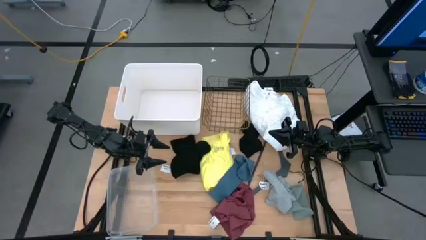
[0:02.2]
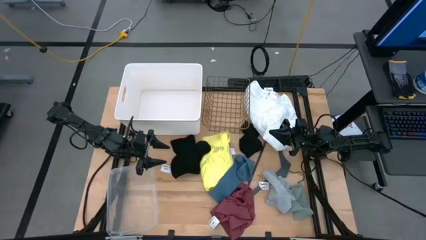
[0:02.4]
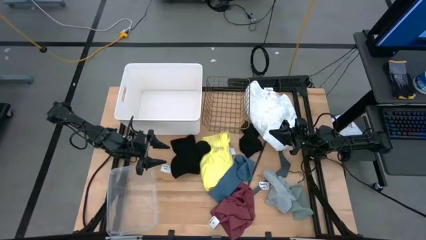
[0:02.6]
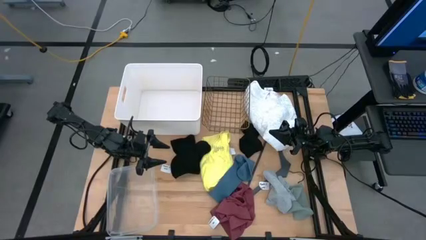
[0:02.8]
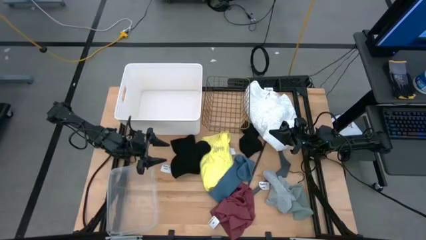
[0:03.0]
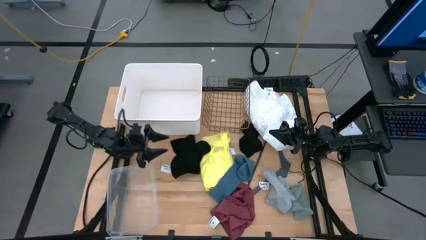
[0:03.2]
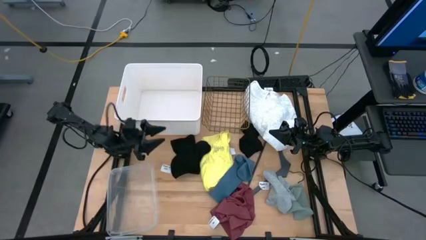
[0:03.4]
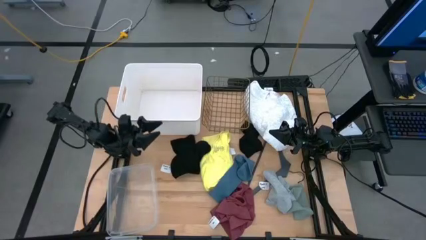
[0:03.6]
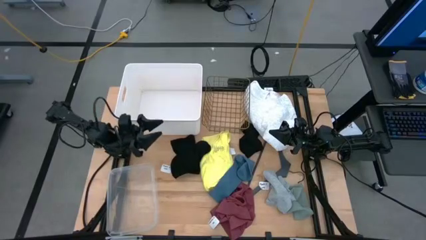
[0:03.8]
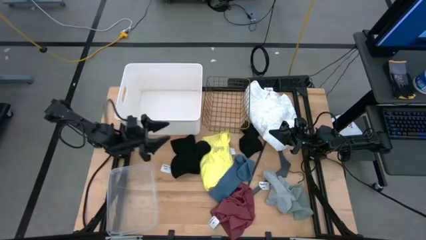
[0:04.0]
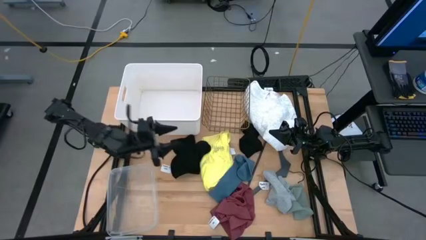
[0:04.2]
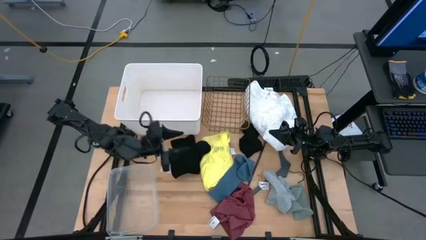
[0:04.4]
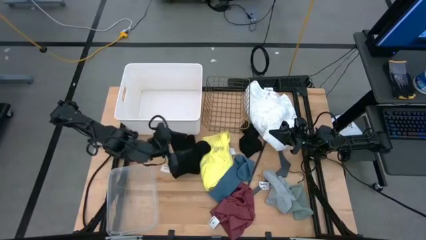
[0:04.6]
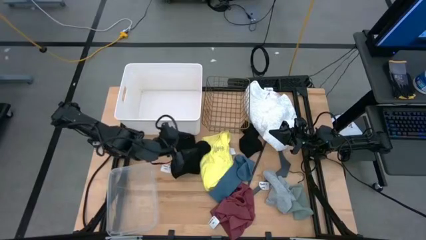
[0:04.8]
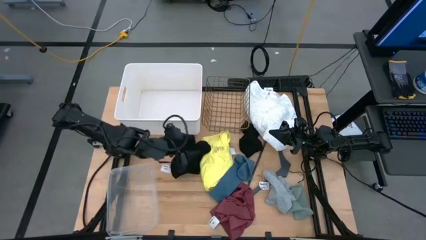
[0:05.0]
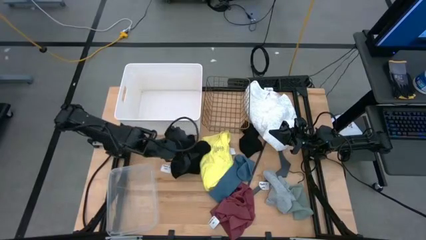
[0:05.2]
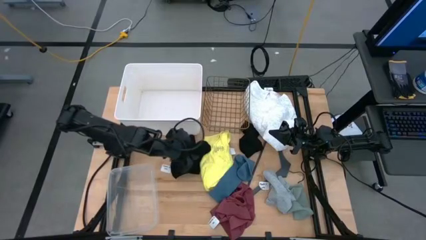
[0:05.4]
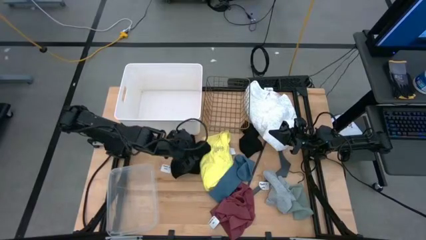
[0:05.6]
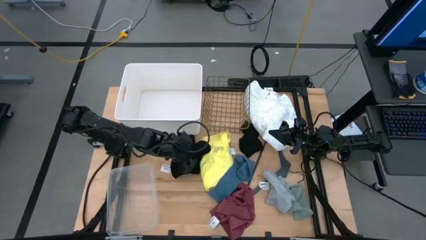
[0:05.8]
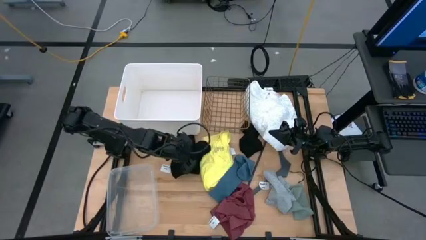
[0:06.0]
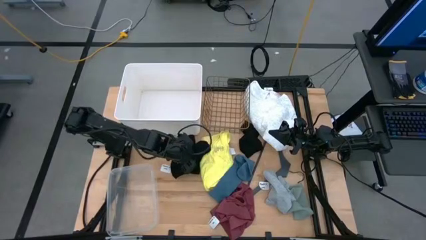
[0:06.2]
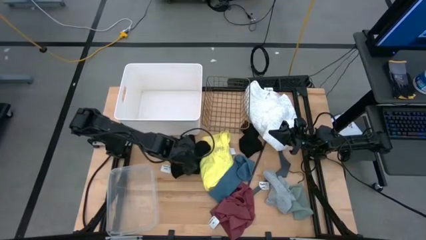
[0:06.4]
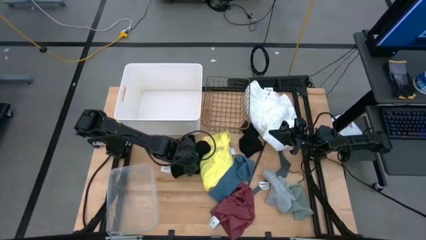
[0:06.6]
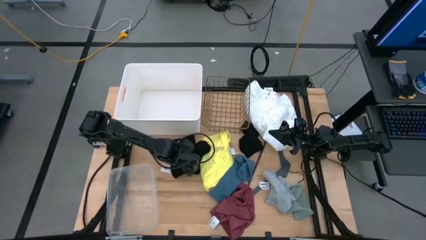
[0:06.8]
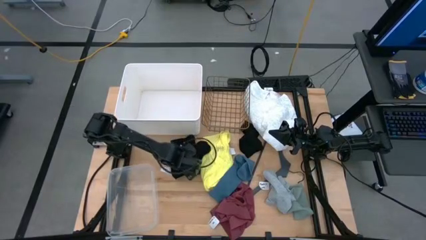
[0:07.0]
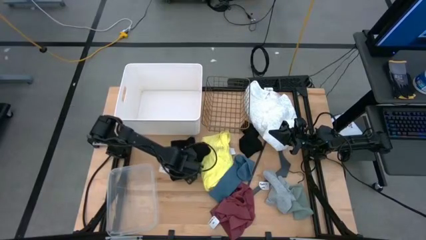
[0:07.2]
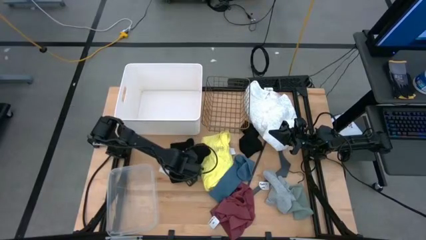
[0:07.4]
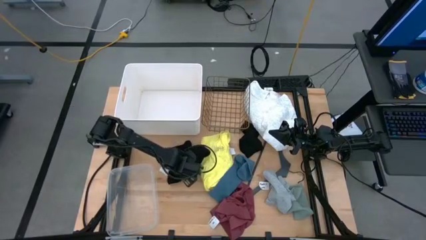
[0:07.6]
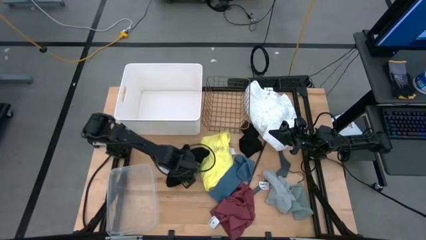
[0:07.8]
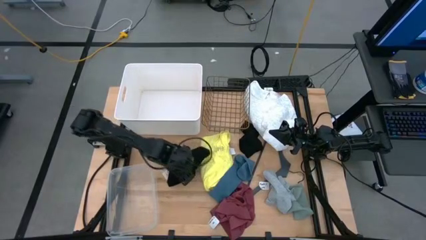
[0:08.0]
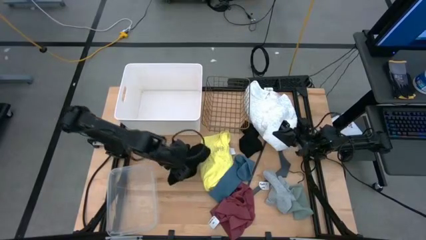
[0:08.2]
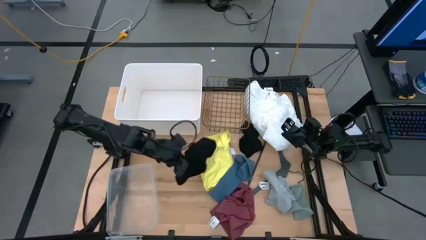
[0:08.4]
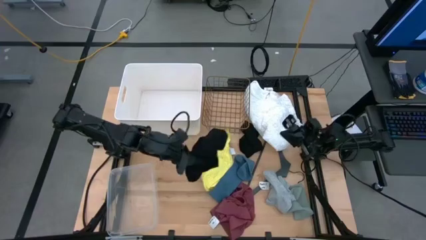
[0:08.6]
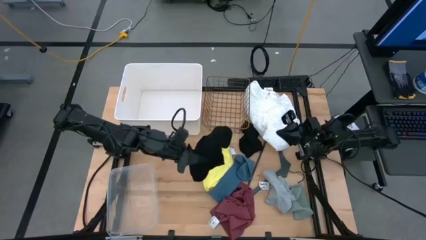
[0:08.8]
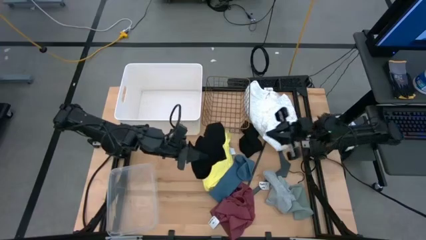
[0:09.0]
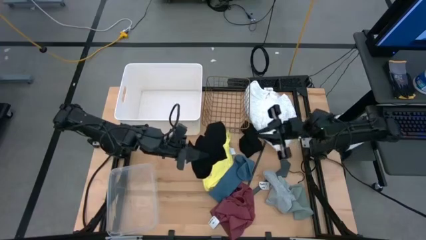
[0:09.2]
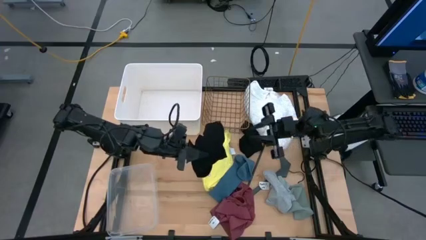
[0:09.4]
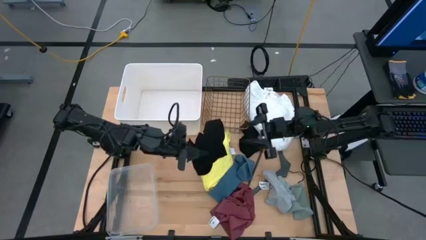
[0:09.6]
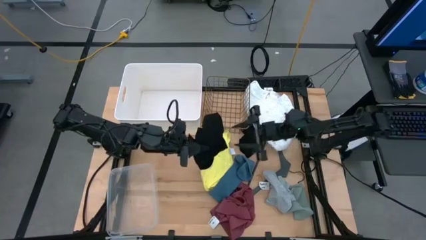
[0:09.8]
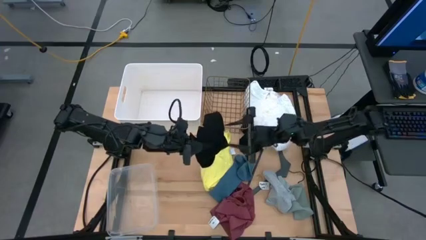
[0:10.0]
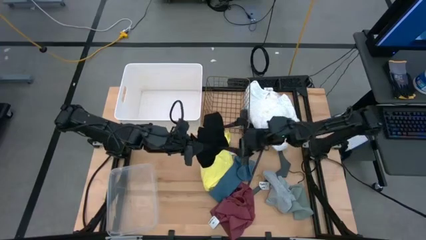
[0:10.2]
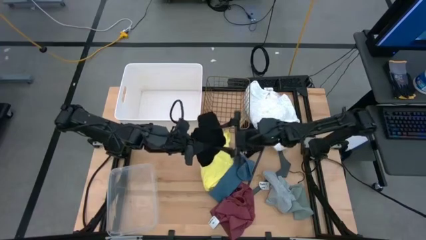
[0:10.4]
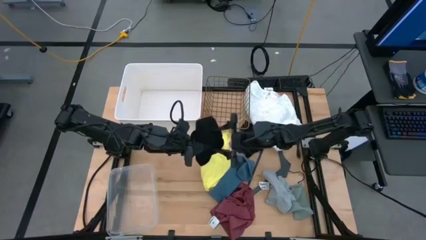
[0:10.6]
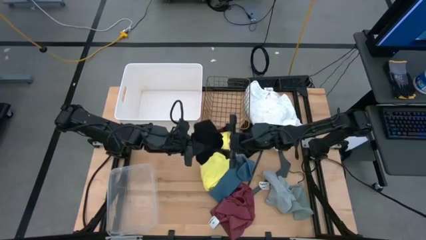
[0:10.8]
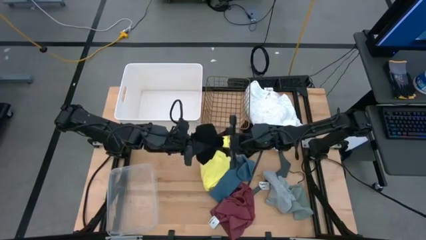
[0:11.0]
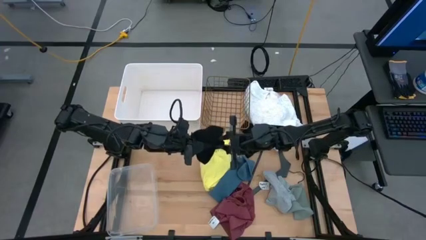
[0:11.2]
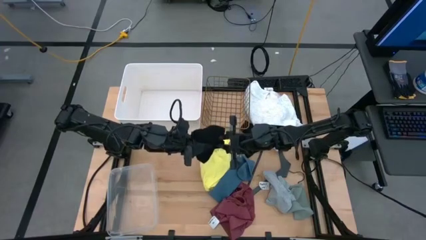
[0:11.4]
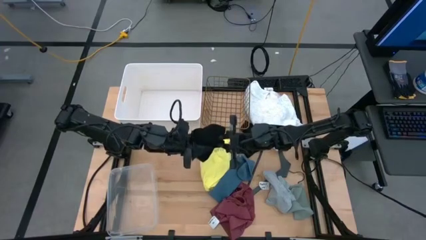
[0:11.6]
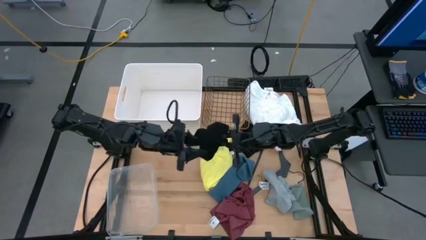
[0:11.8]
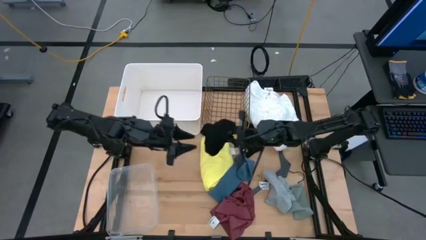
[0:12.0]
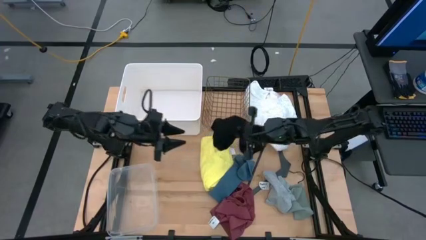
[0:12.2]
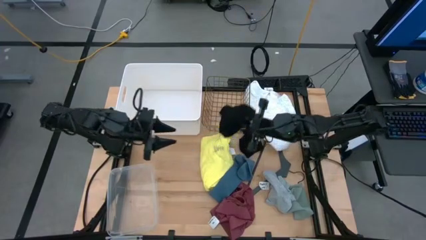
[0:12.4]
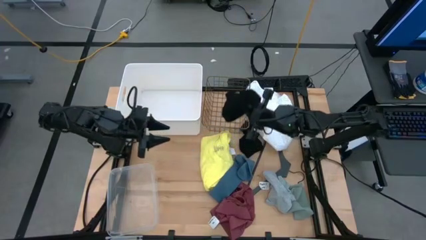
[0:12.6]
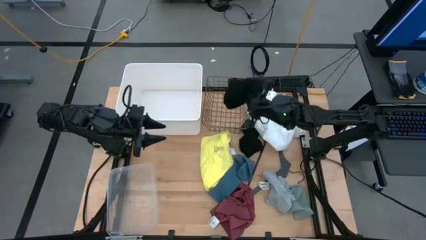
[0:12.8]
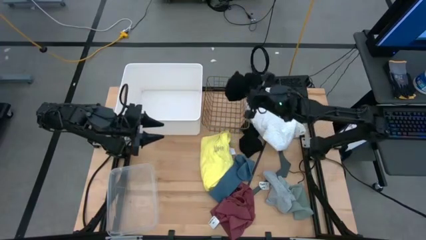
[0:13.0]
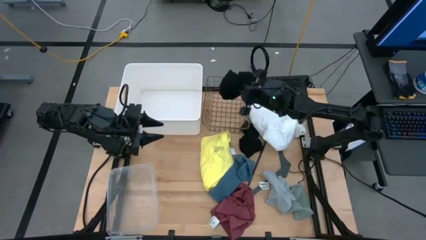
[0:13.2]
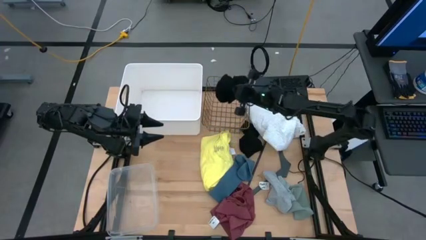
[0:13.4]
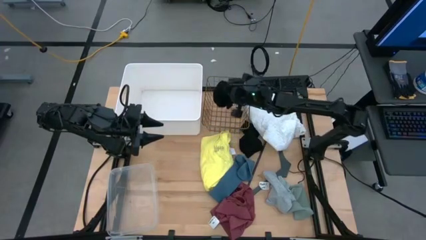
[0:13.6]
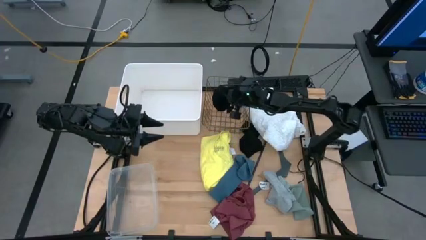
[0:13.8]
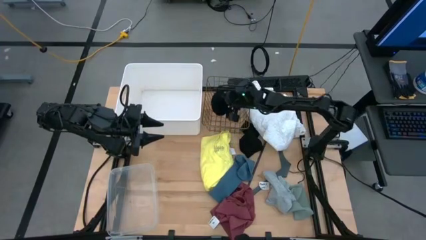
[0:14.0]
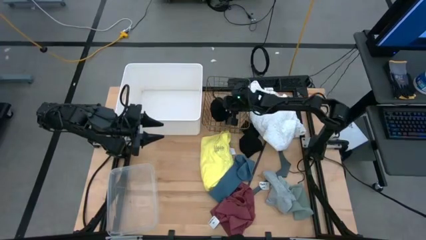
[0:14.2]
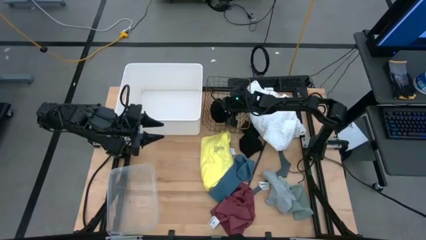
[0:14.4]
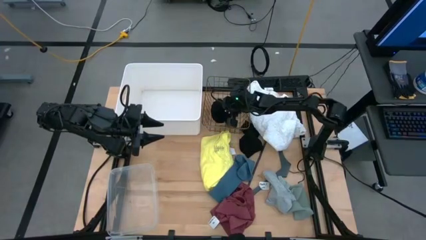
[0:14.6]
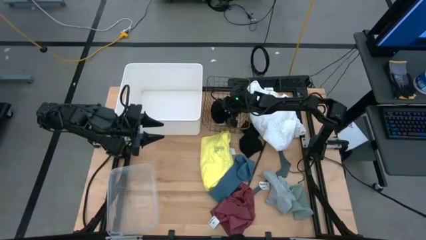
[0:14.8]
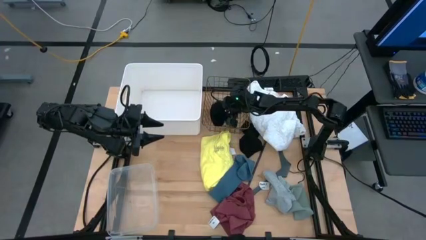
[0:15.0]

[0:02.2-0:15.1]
Task: Pick & Place Cloths
Put the black boxers into the wire basket
